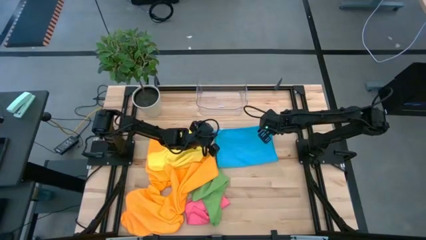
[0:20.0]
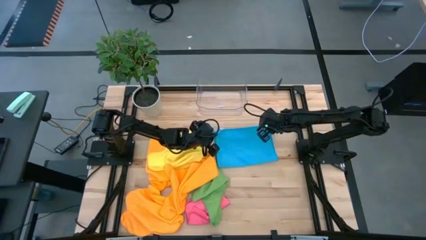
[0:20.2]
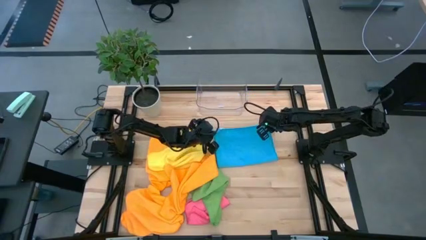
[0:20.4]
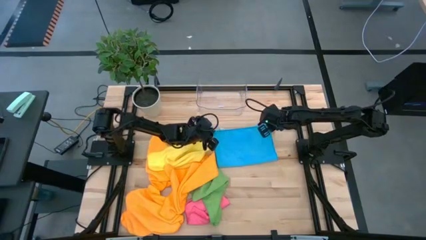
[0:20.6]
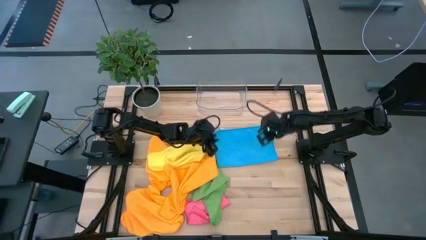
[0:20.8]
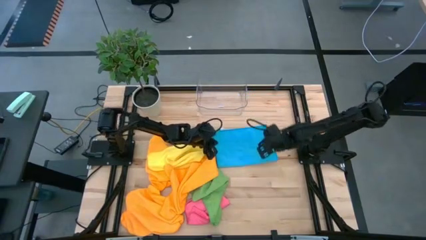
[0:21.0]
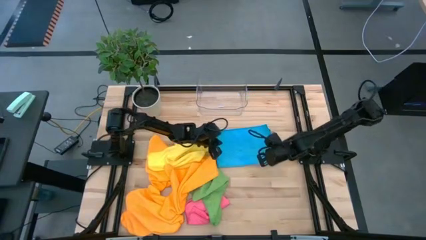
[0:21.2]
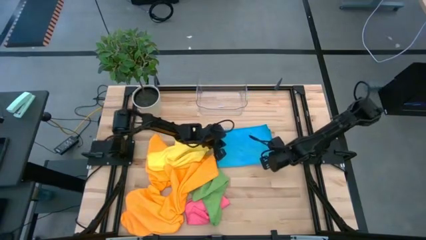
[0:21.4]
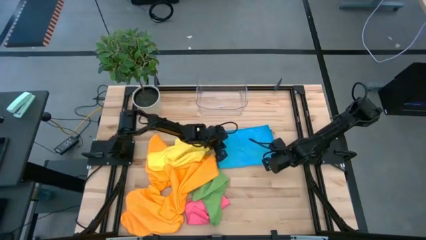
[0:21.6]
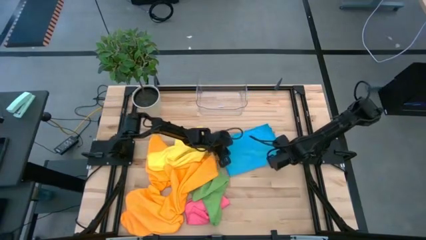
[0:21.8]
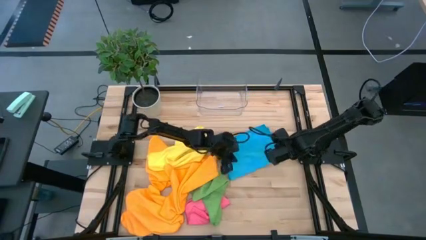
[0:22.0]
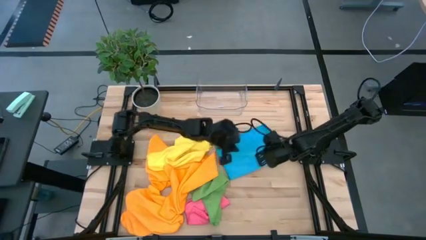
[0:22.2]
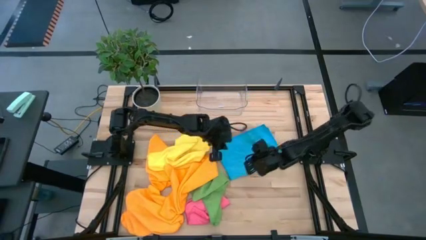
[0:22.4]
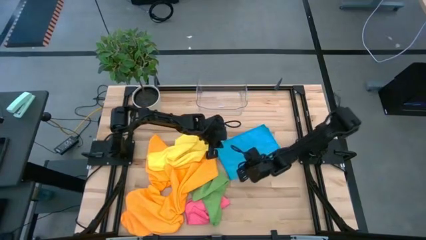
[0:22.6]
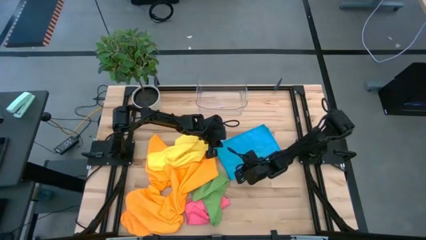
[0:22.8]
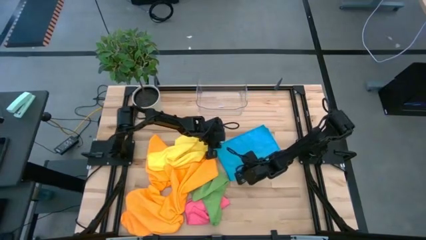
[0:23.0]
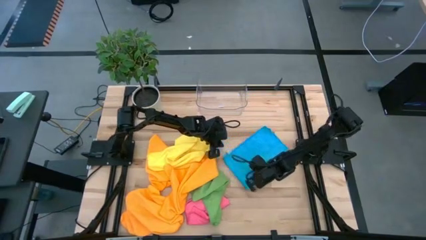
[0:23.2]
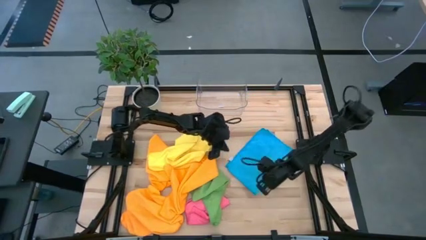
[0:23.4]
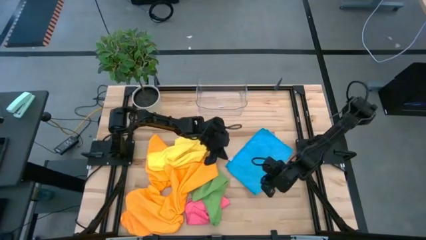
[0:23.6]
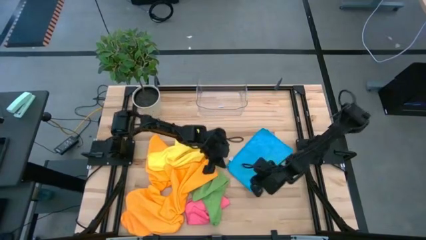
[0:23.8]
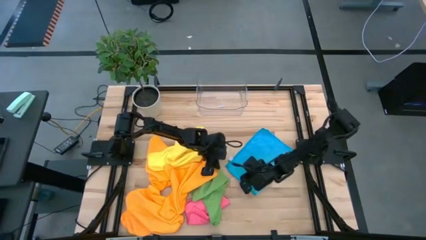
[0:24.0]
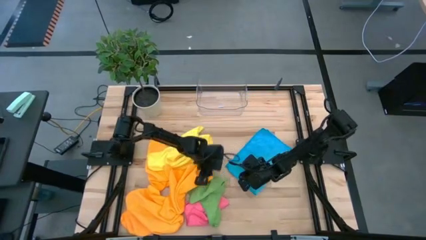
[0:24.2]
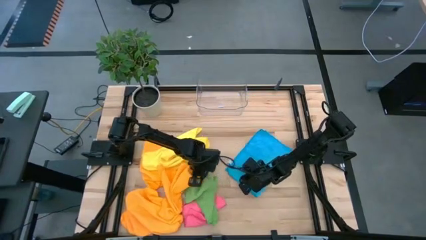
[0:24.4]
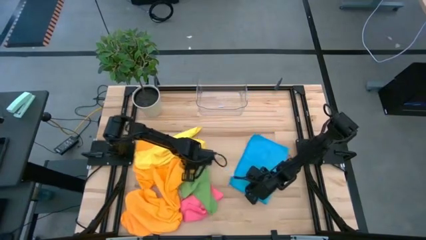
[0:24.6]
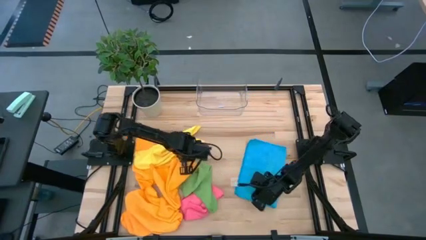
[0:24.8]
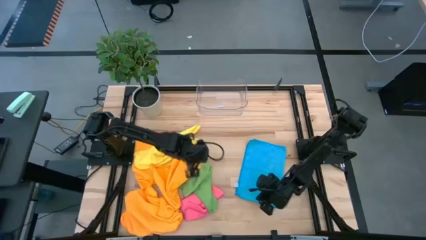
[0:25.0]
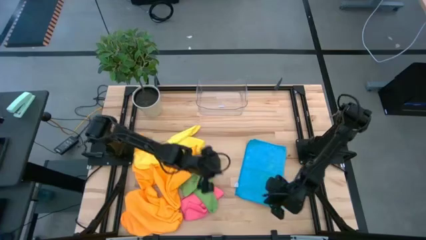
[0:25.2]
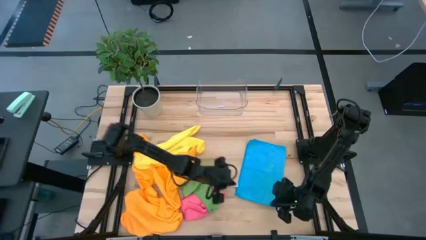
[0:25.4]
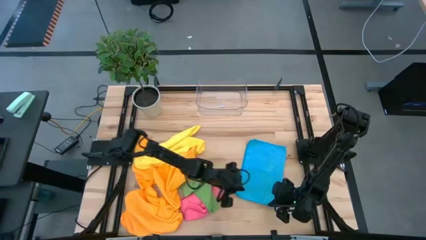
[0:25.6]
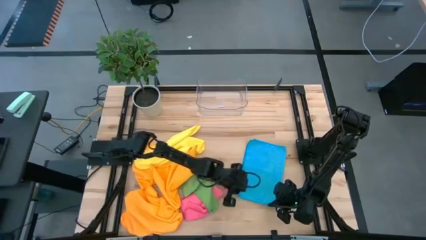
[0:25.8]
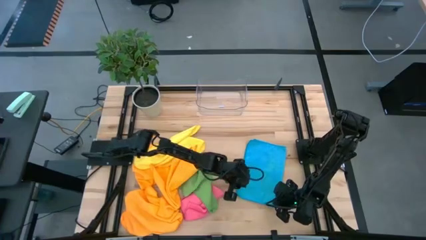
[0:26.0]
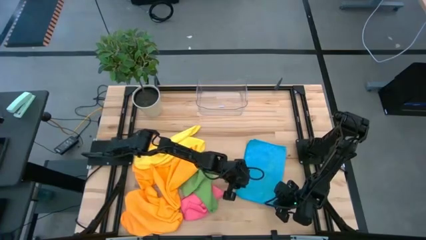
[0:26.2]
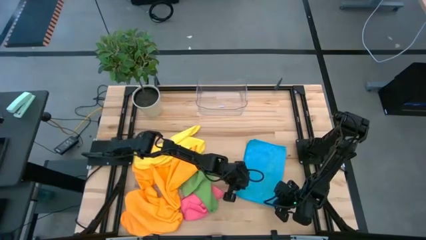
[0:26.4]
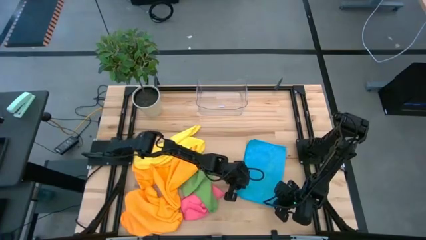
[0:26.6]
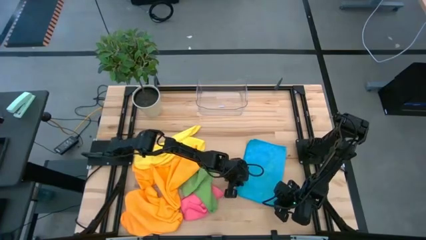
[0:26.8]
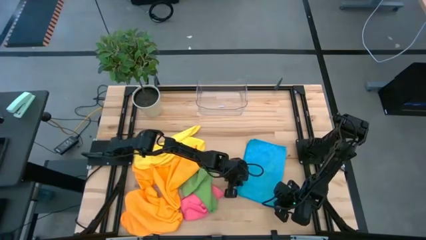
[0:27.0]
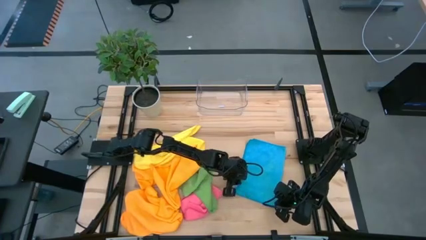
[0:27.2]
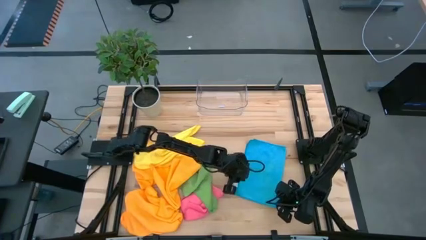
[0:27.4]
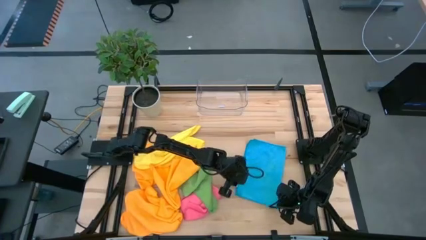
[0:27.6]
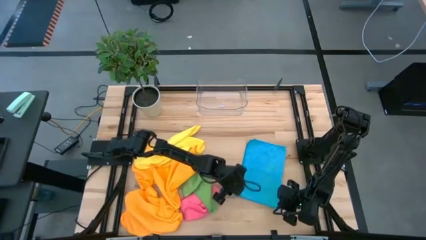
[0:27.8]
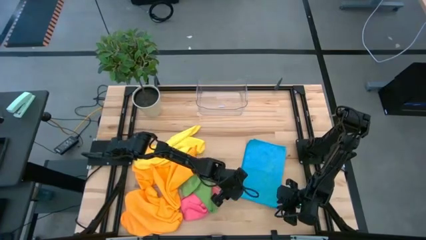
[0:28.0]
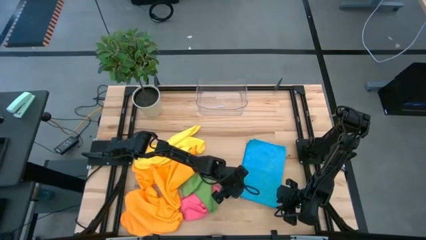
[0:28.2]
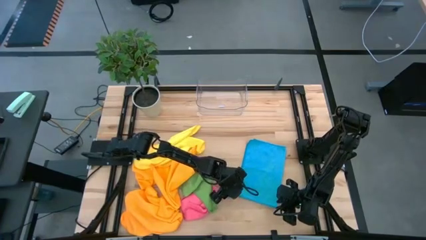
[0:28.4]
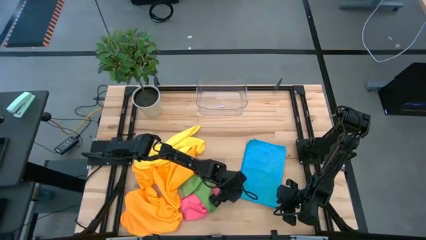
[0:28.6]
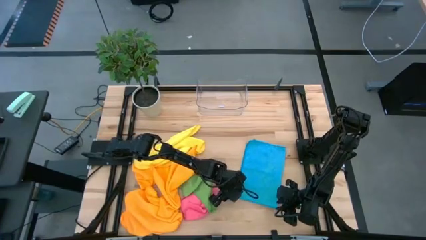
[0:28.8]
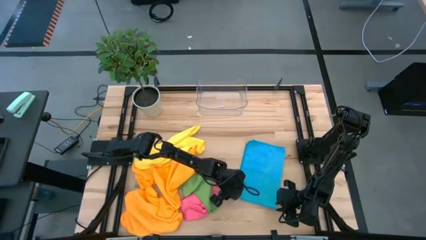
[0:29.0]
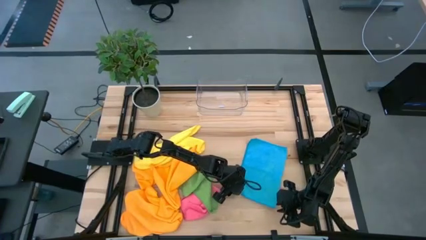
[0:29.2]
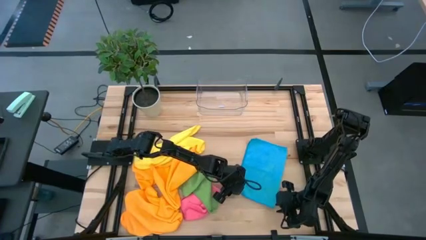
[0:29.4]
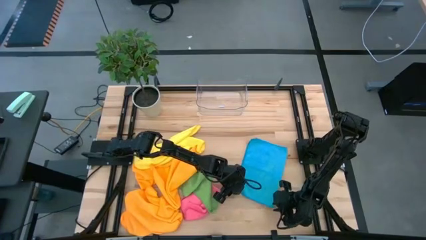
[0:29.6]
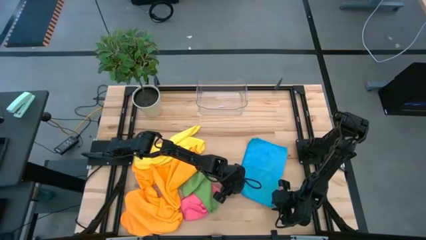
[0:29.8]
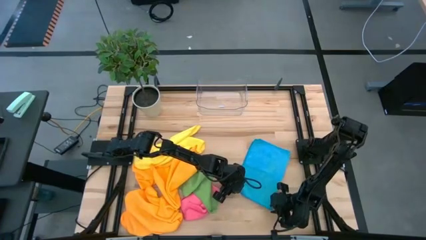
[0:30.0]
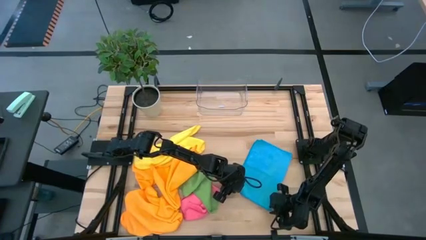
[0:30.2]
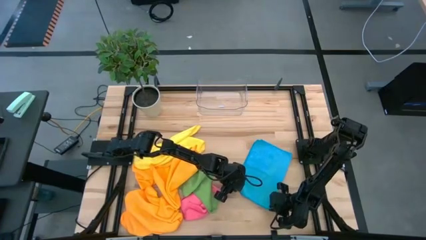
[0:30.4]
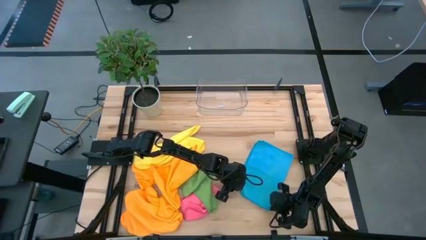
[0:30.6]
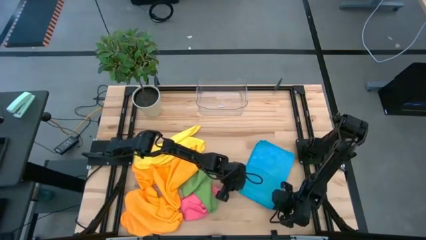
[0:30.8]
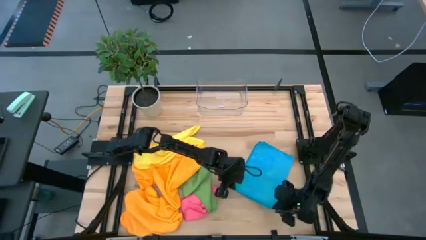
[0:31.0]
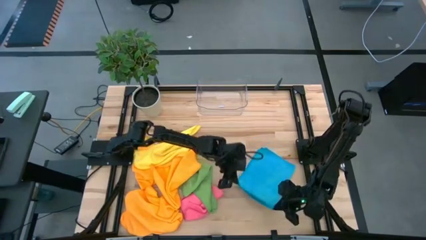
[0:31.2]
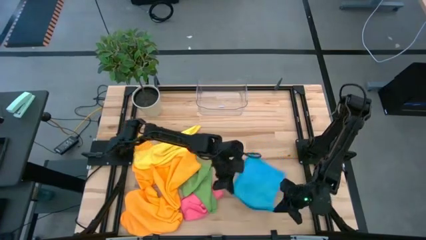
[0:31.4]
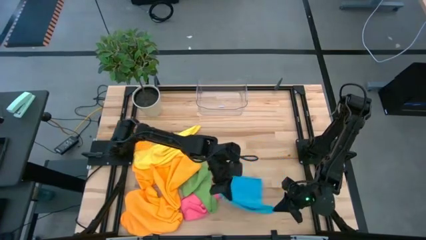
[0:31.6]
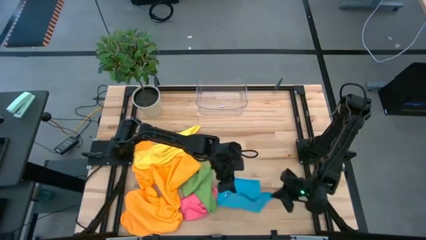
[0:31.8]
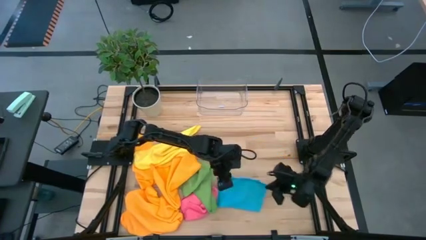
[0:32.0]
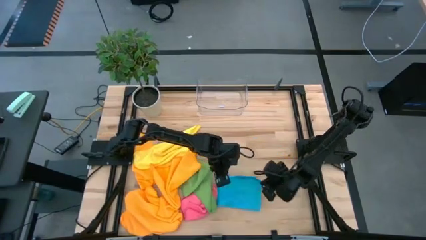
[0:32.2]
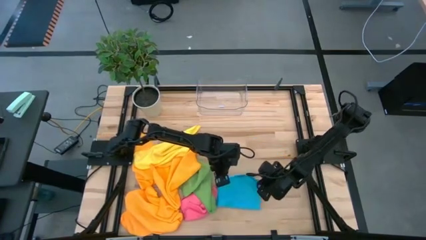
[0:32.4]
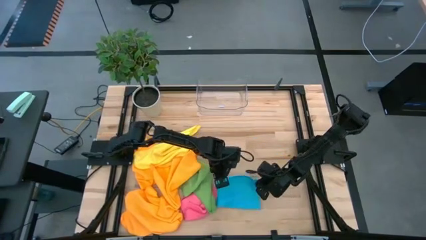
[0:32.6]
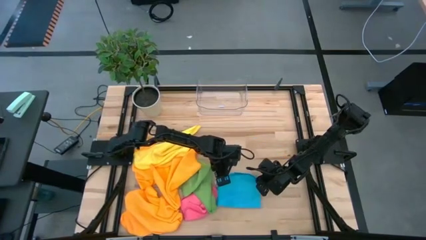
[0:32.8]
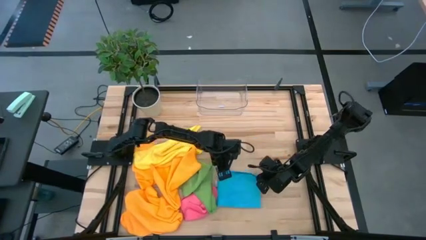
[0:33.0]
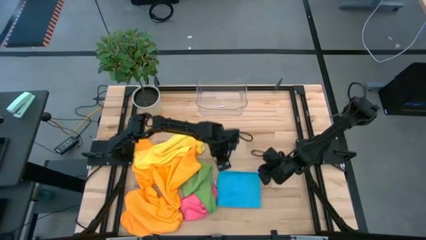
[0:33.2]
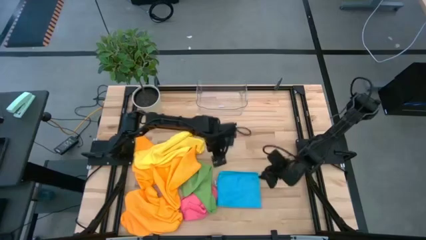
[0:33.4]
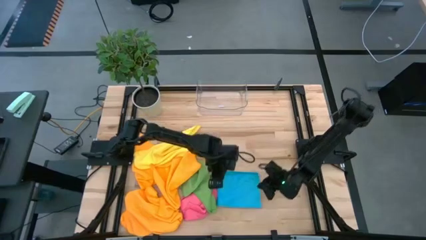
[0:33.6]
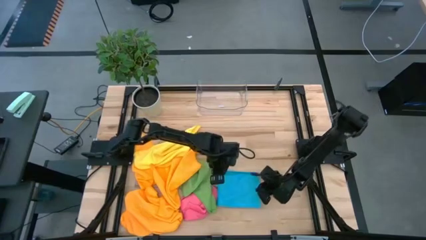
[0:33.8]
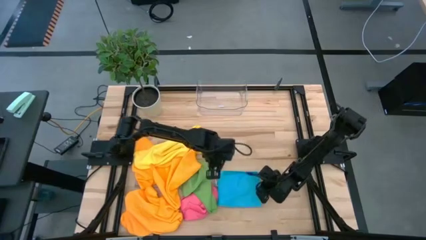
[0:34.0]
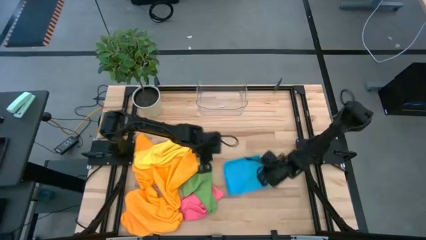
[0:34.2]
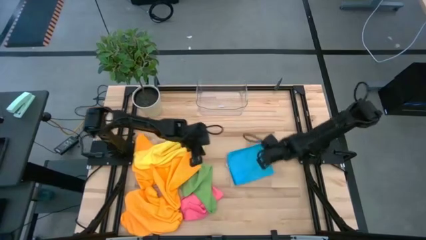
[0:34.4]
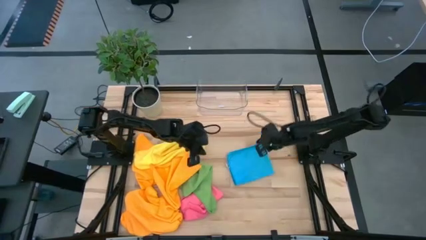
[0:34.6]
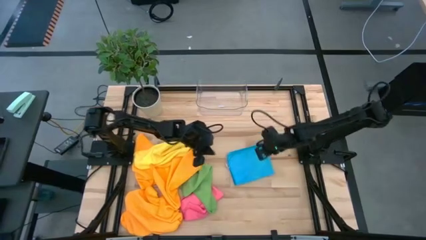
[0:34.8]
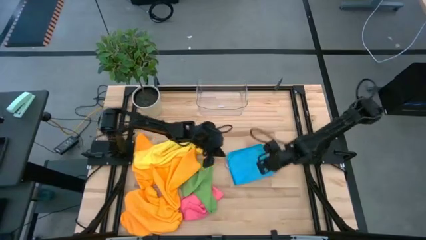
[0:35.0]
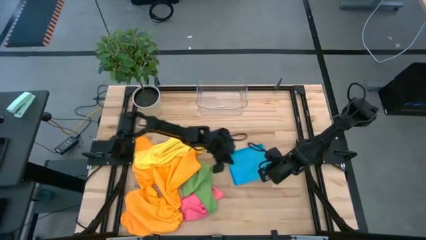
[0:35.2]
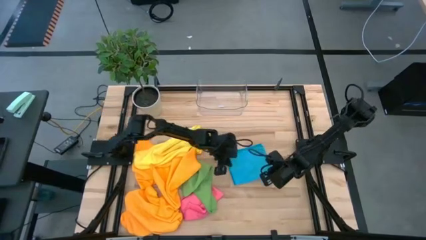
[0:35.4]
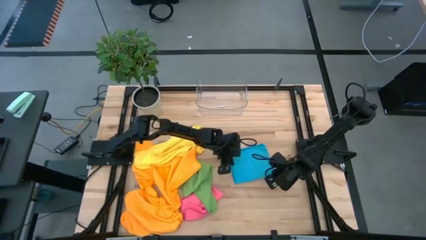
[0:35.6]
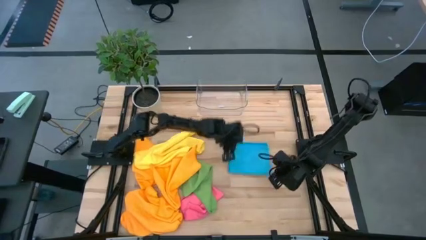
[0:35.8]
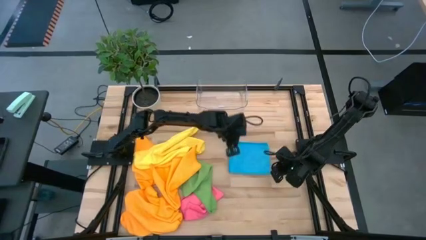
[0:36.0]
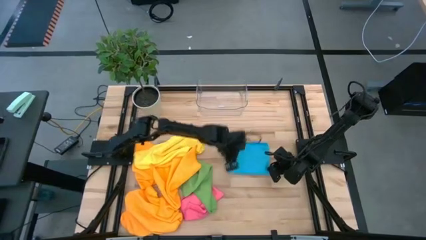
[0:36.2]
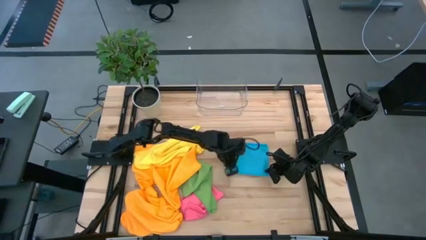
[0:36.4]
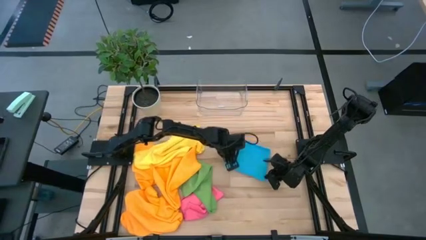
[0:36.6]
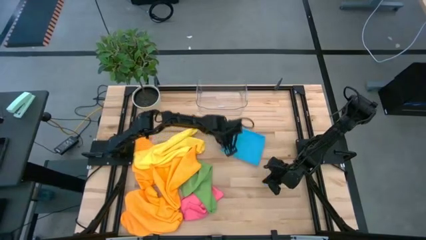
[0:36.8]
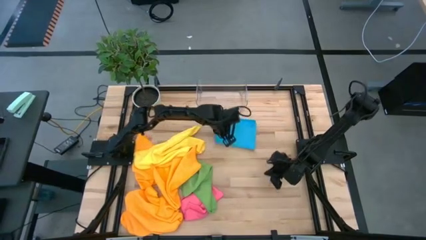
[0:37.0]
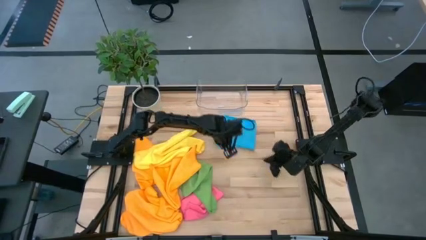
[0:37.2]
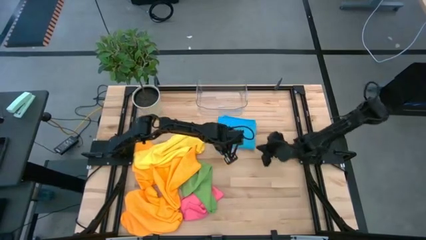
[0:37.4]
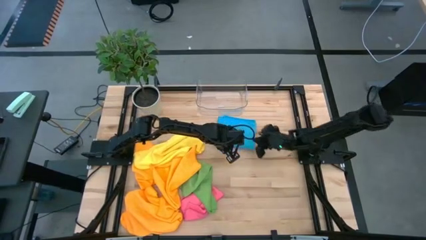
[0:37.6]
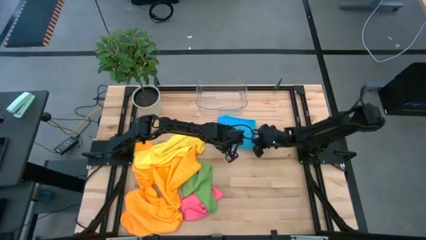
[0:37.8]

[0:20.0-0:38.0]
Task: Fold microfiber towels
Fold the blue towel
